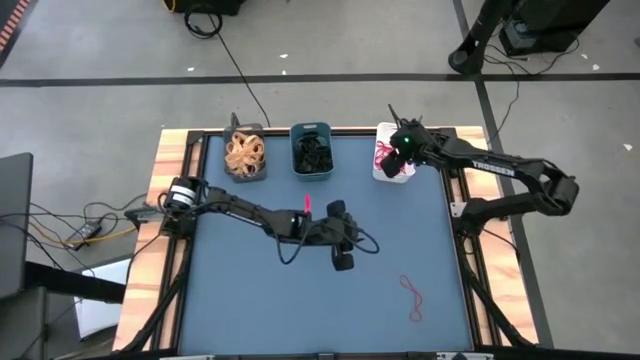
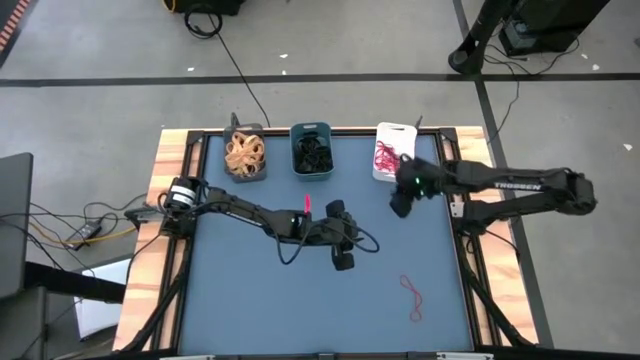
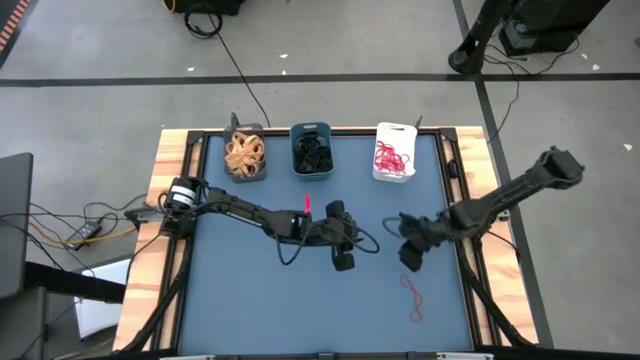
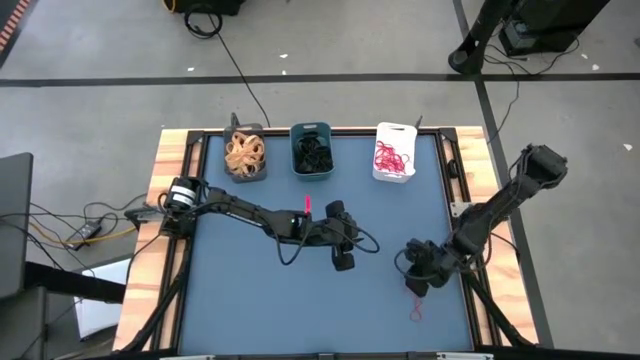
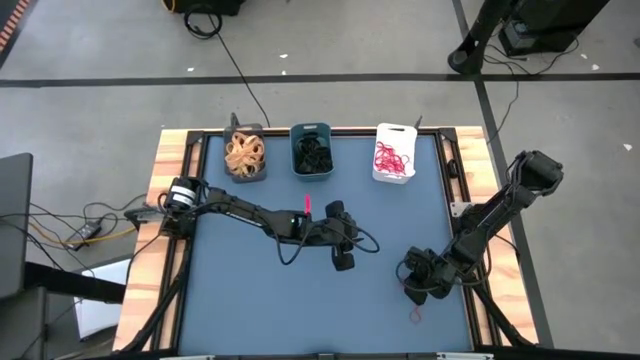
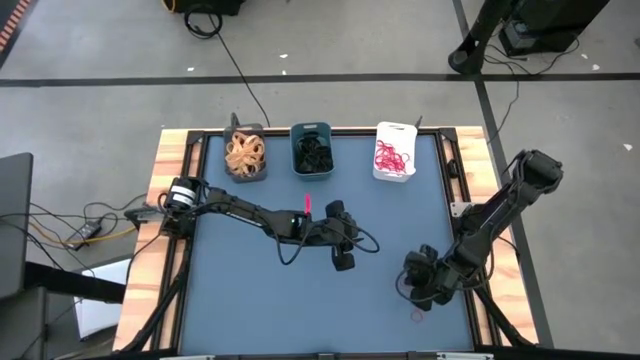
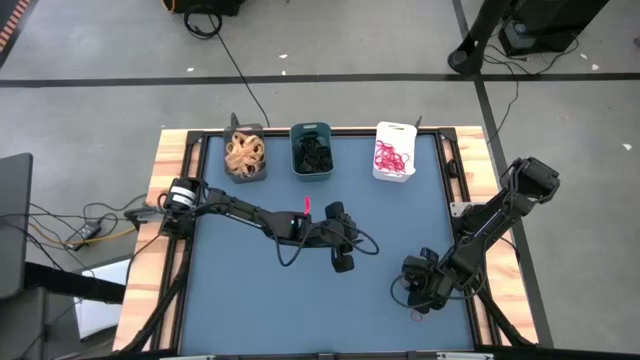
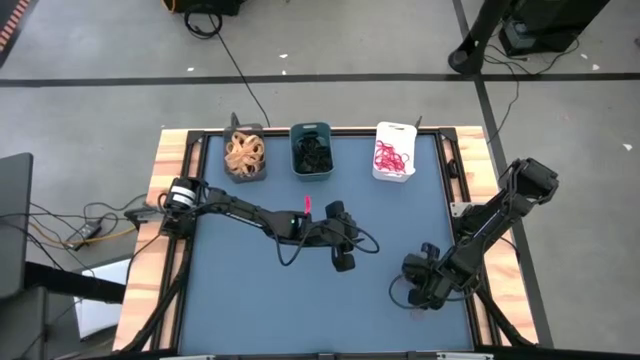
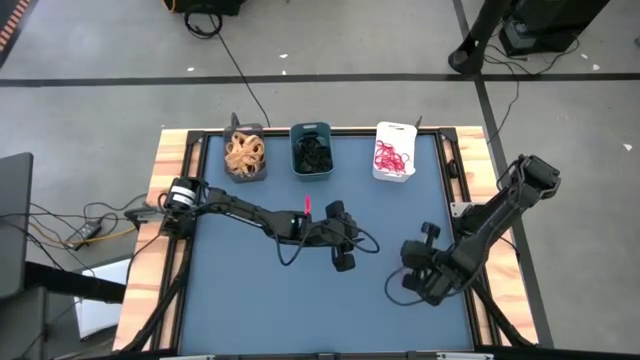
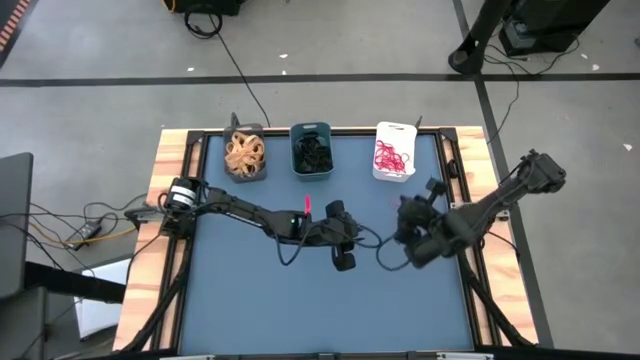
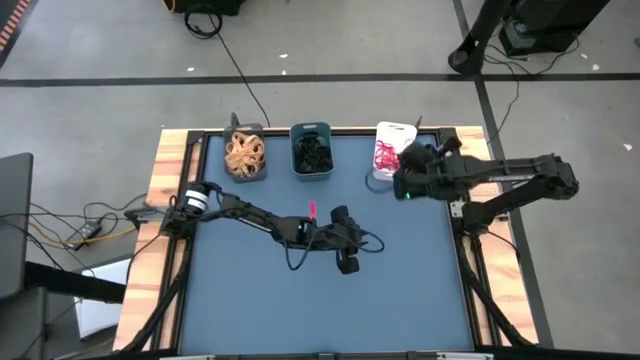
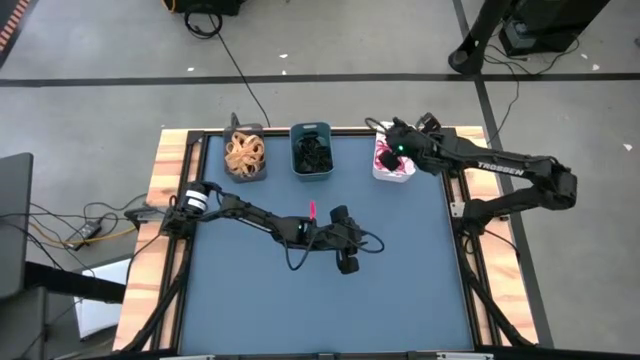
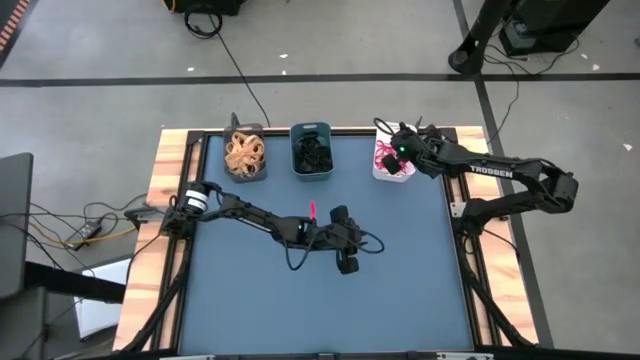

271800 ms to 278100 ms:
Task: Sort rubber bands into baskets
Put the red rubber band into the white bin

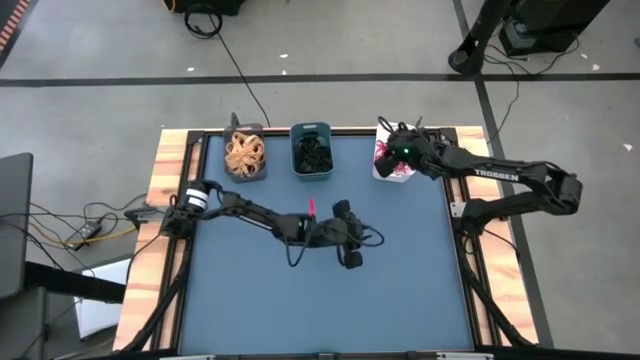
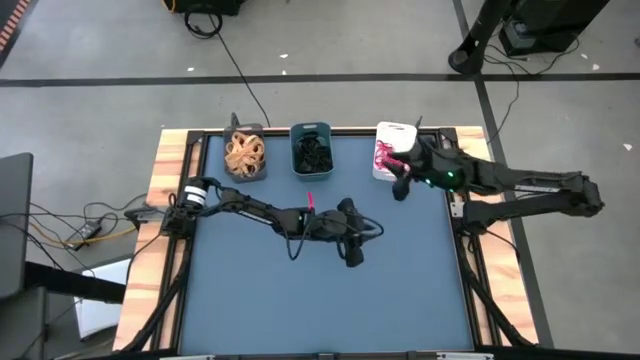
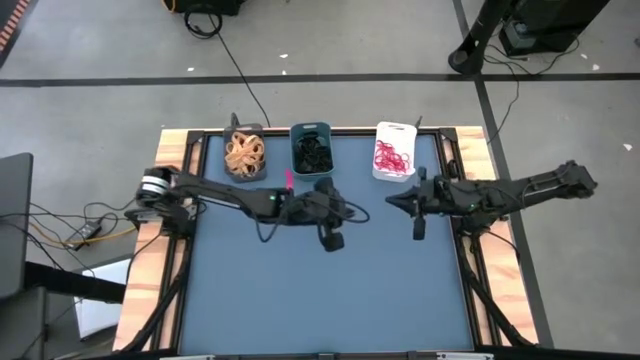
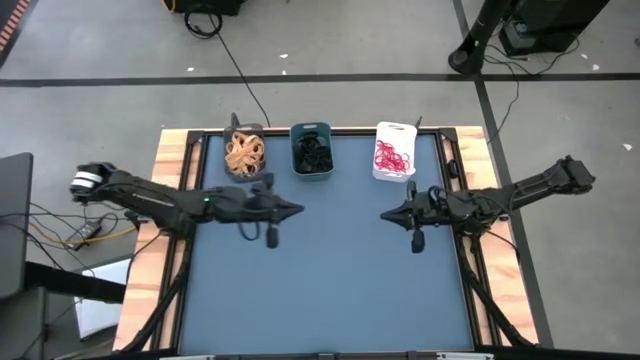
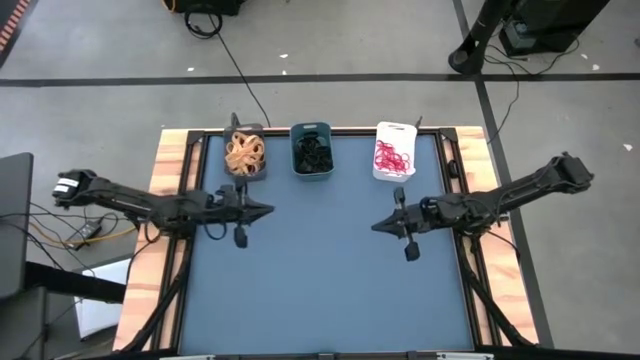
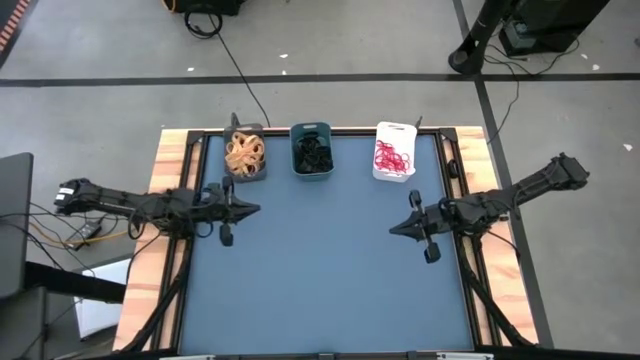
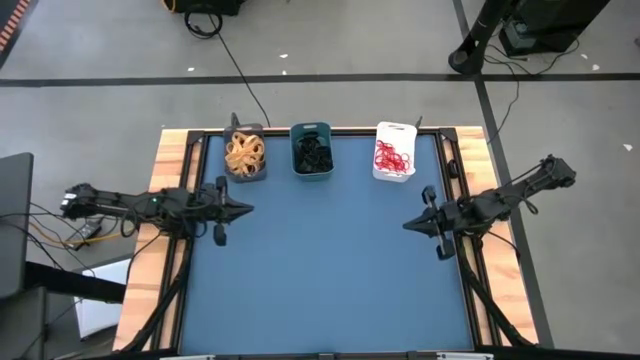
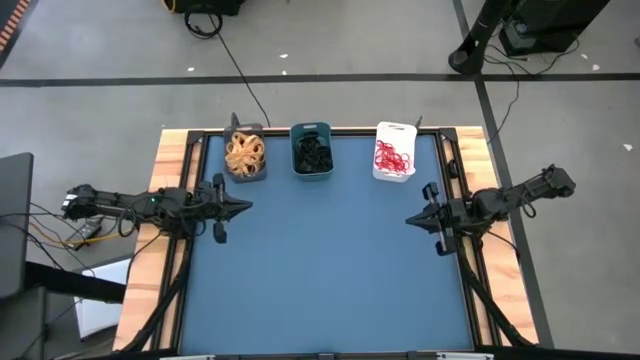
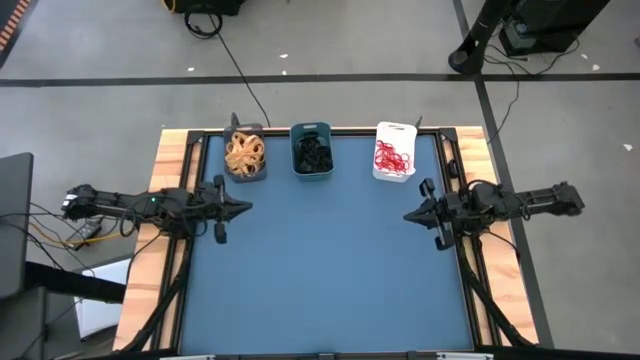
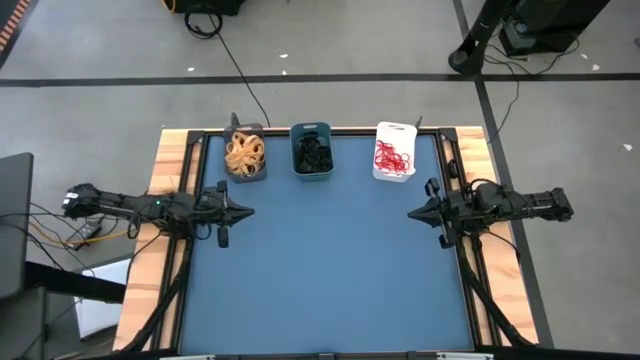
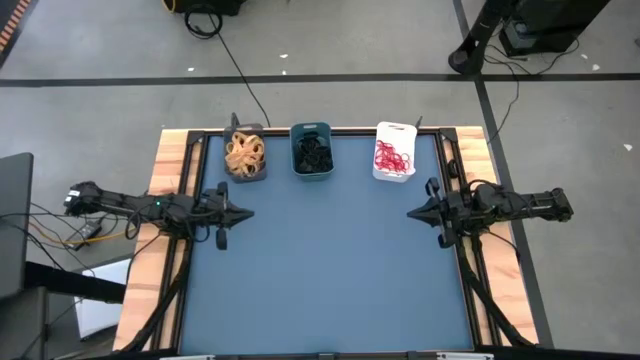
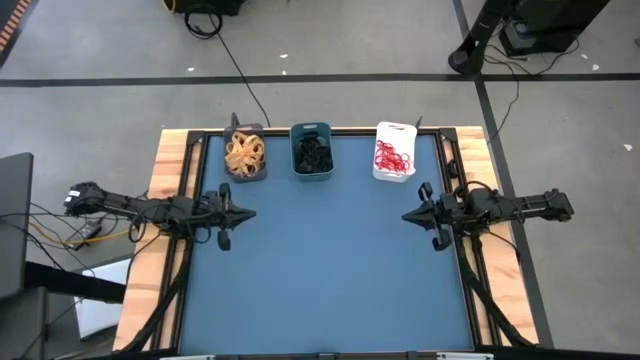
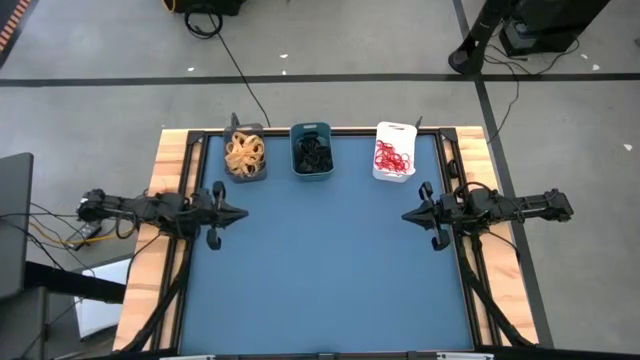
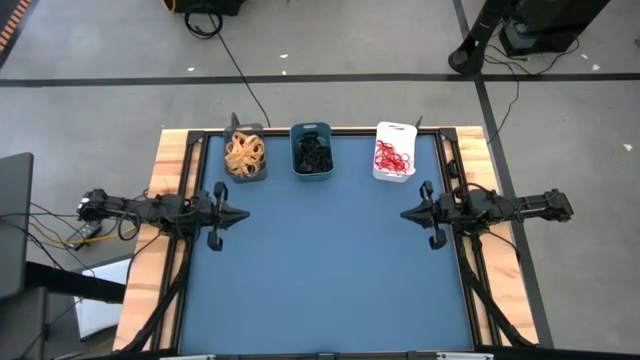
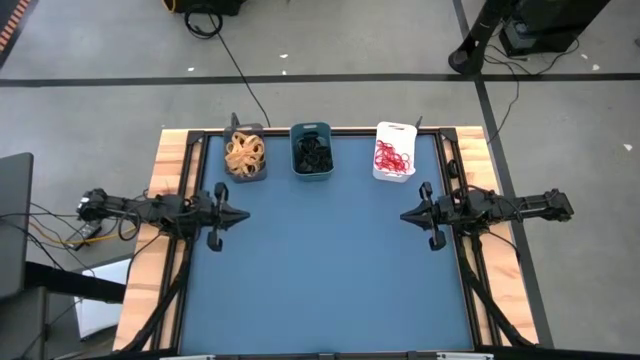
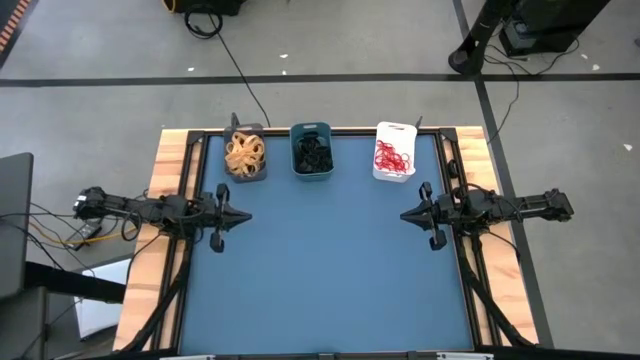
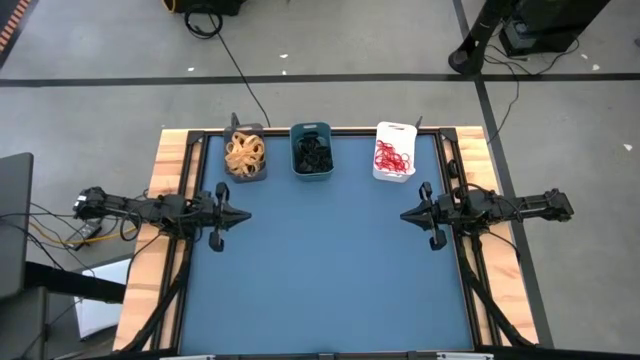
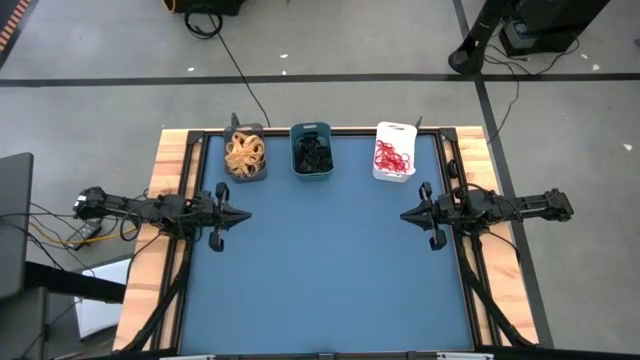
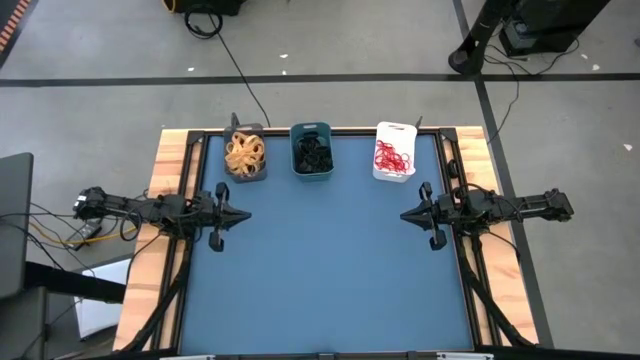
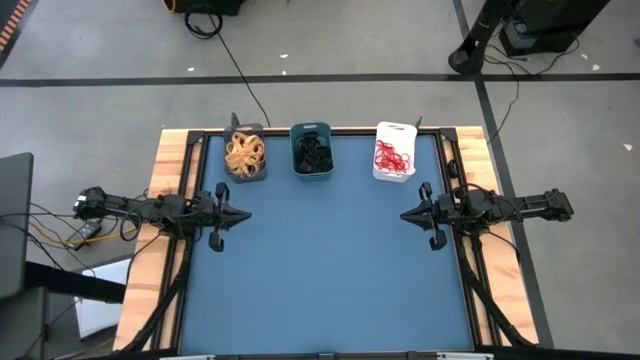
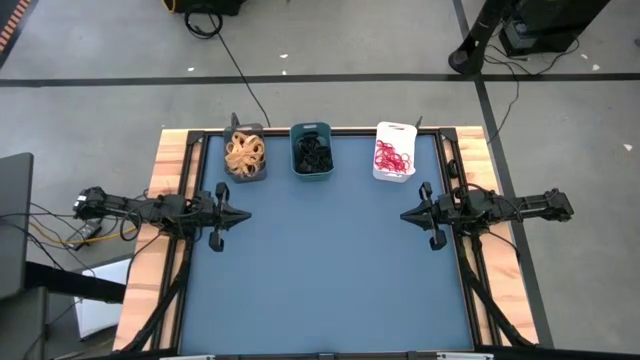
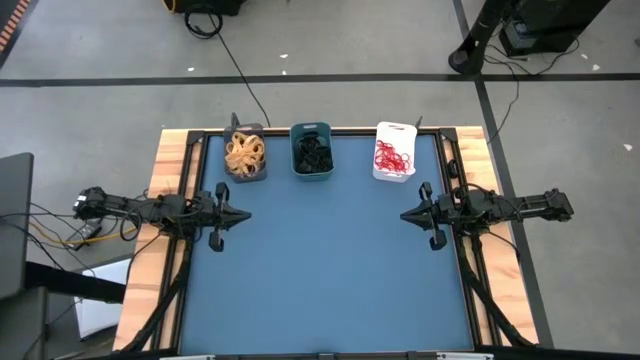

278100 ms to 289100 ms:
Return to Home Position

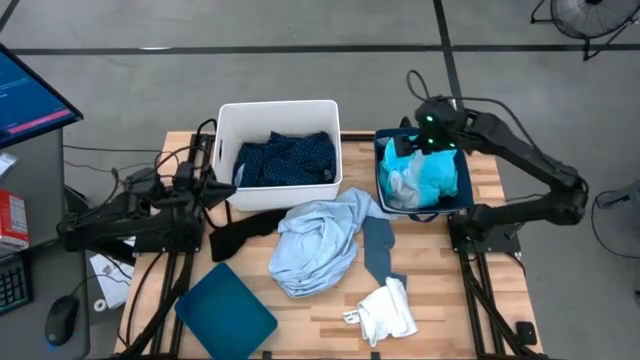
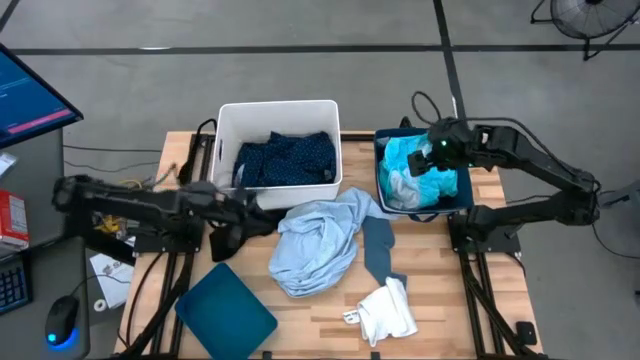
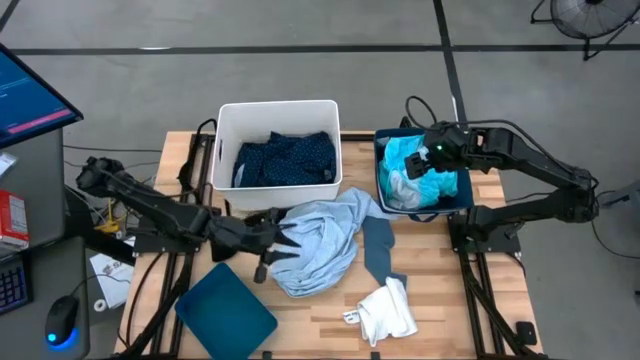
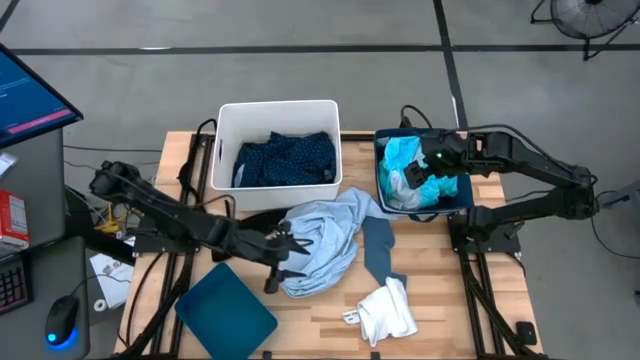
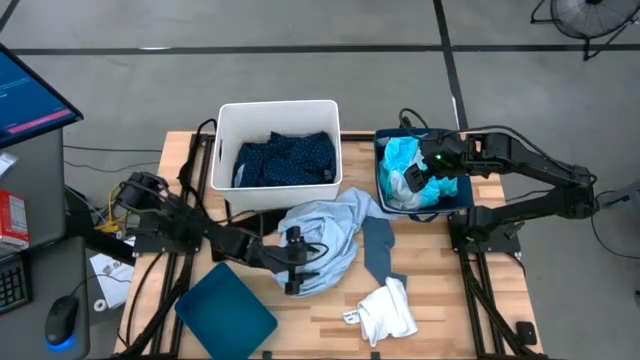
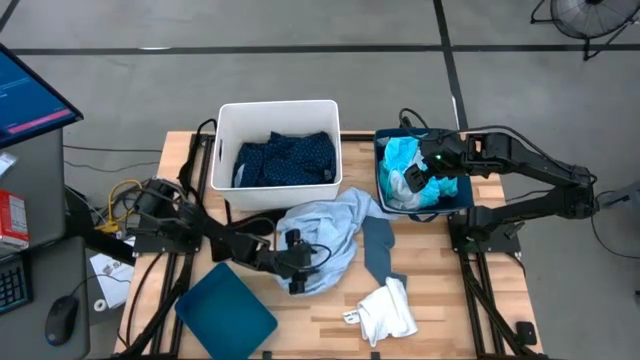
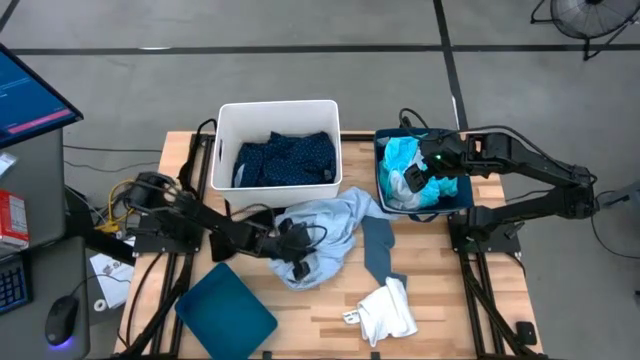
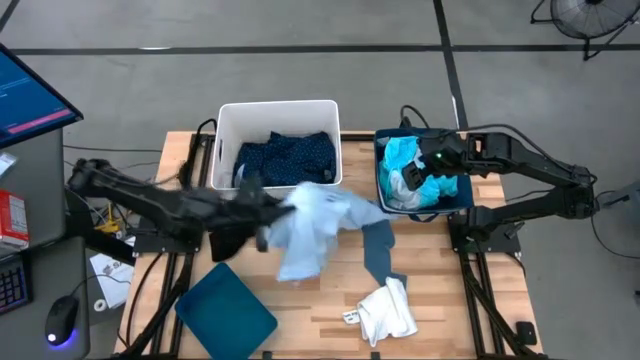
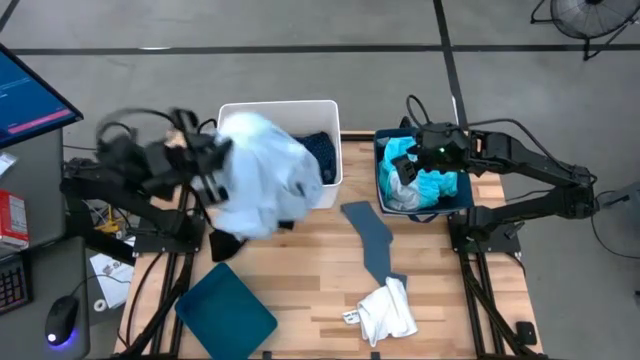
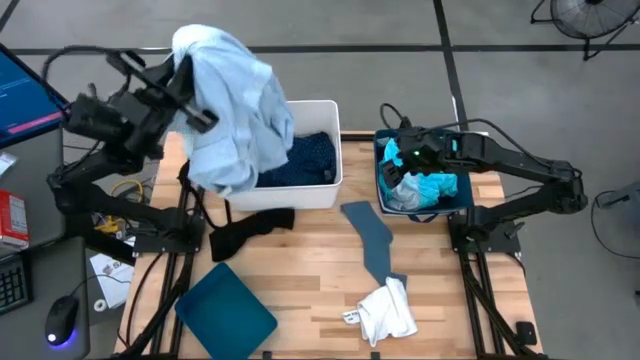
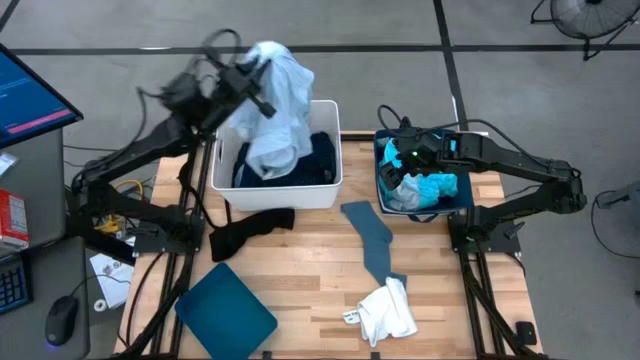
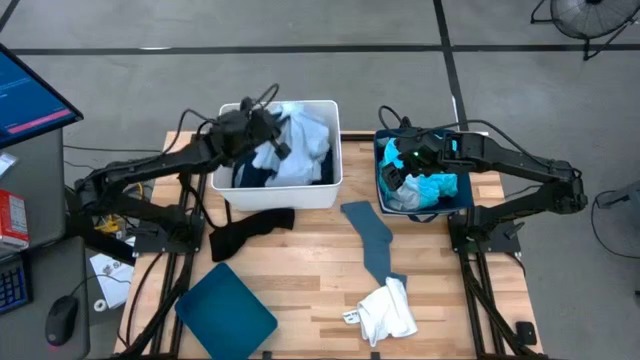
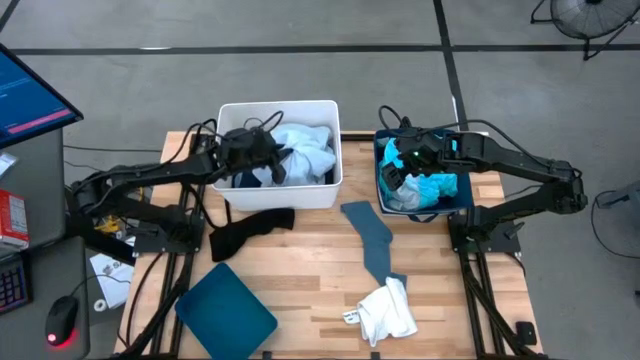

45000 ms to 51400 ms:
Task: Pick & Place Cloths
Put the white patterned shirt into the white bin
